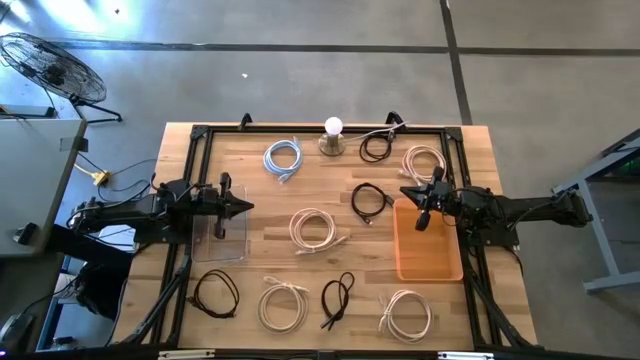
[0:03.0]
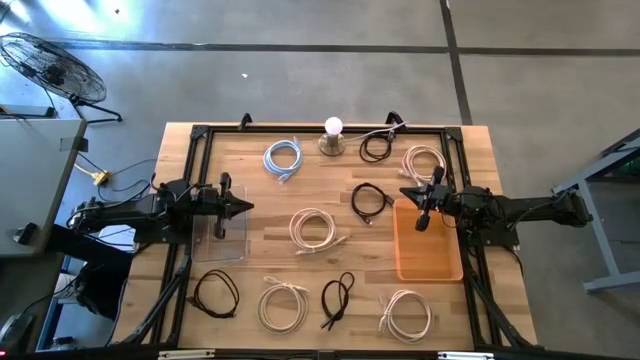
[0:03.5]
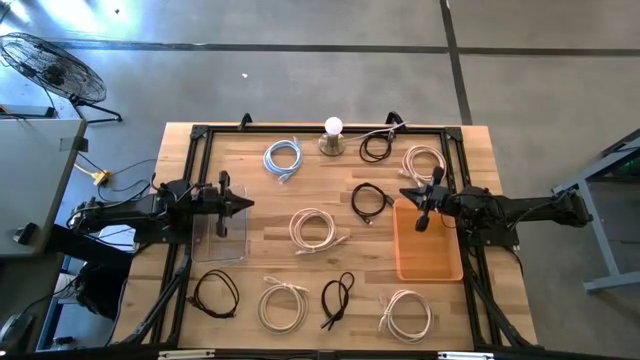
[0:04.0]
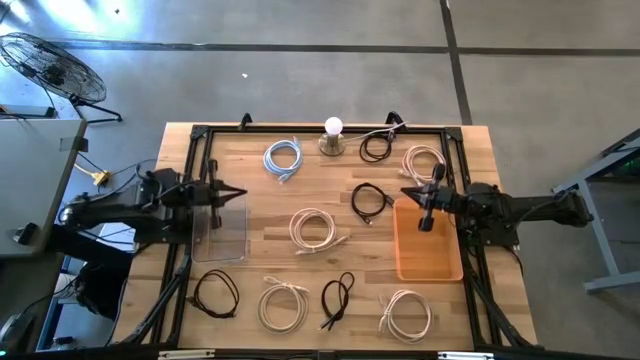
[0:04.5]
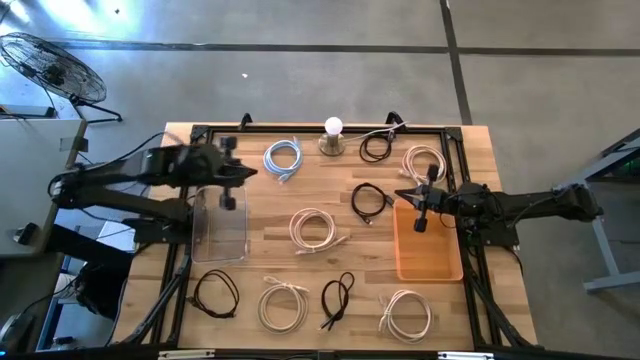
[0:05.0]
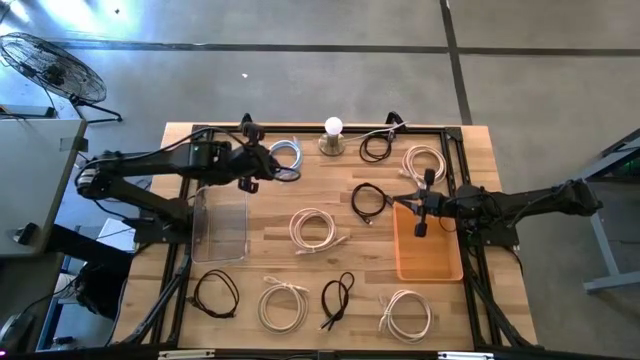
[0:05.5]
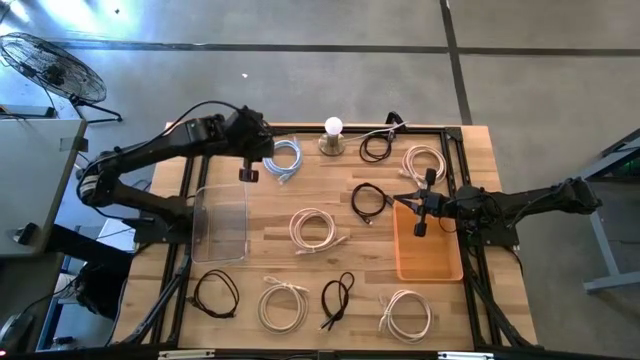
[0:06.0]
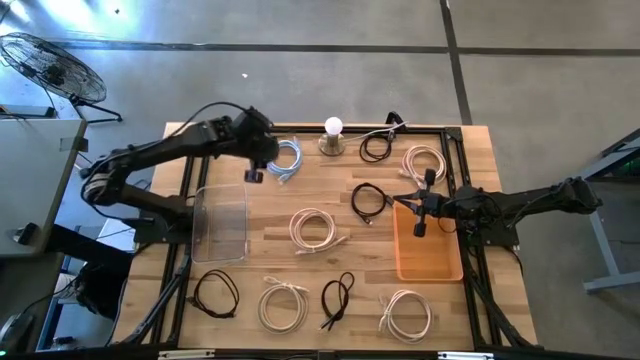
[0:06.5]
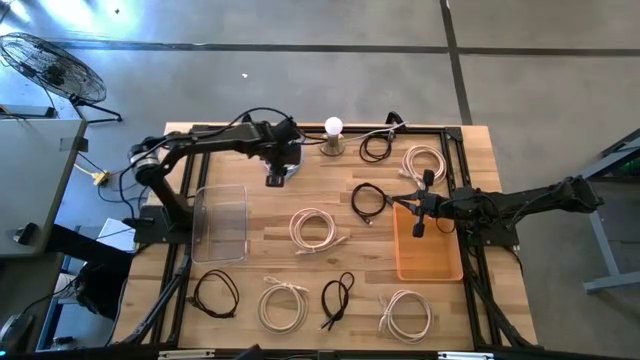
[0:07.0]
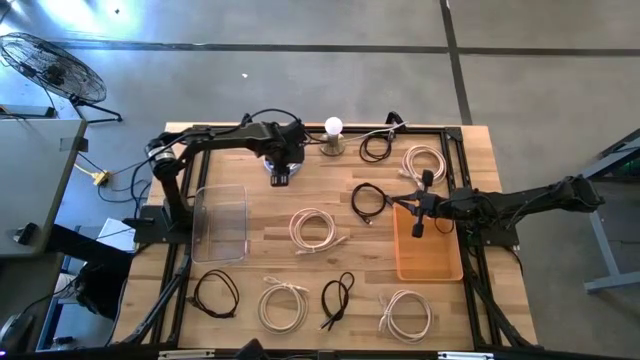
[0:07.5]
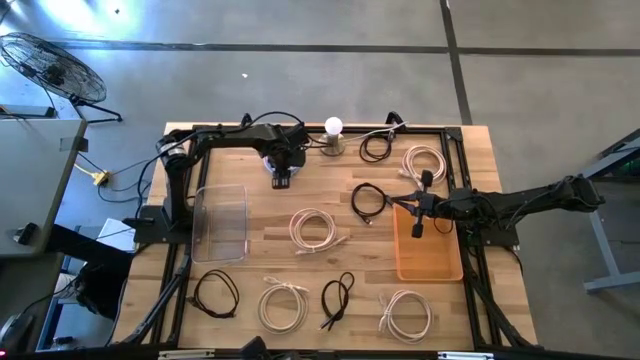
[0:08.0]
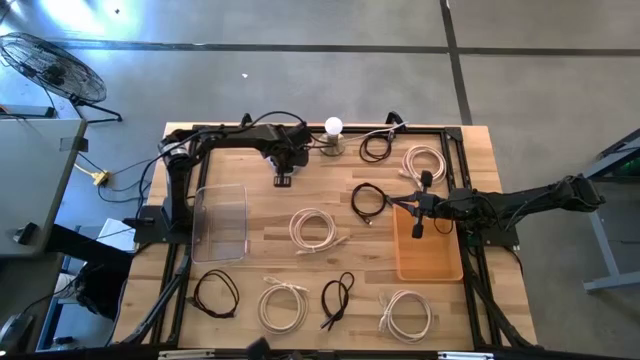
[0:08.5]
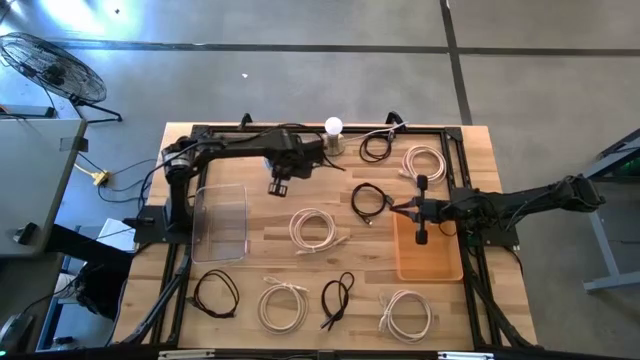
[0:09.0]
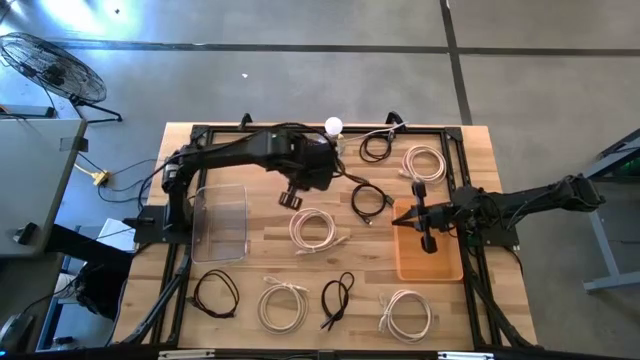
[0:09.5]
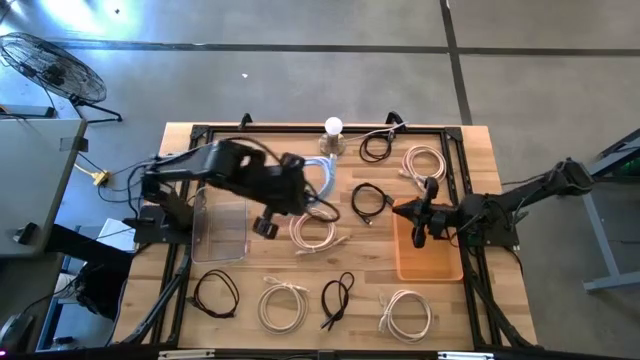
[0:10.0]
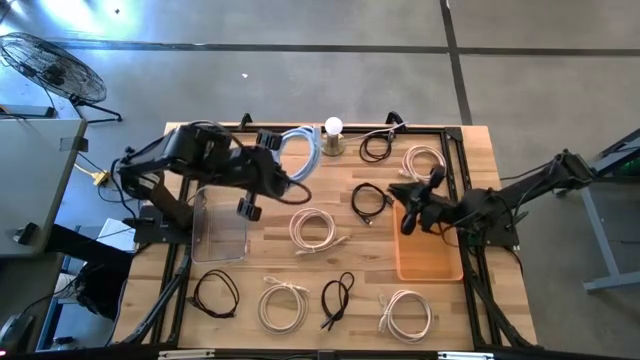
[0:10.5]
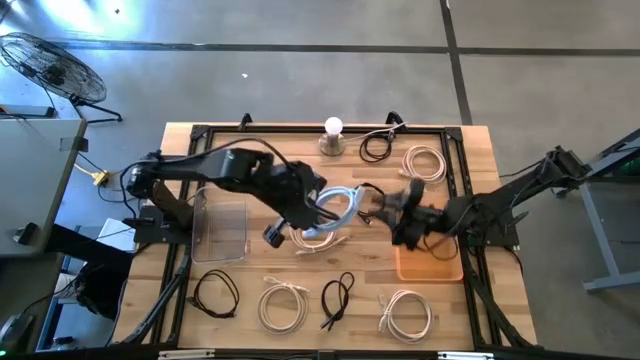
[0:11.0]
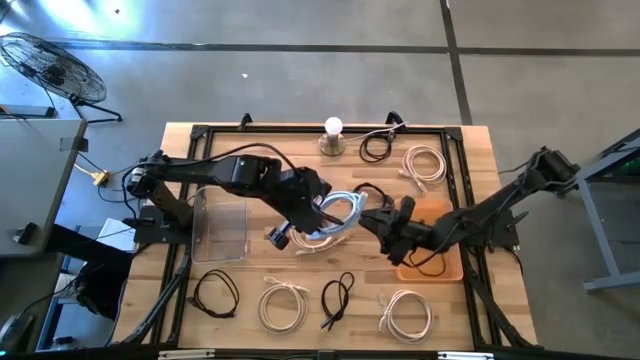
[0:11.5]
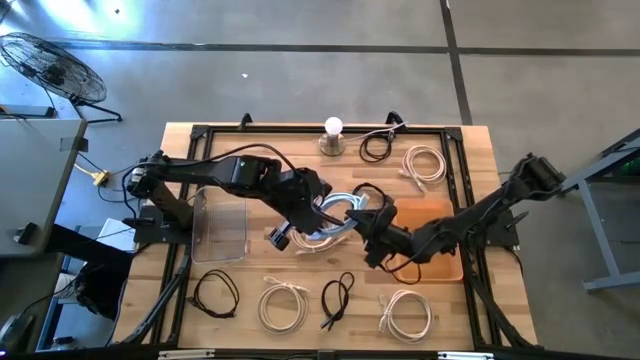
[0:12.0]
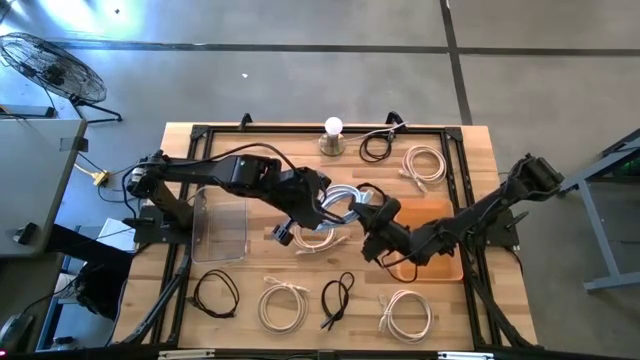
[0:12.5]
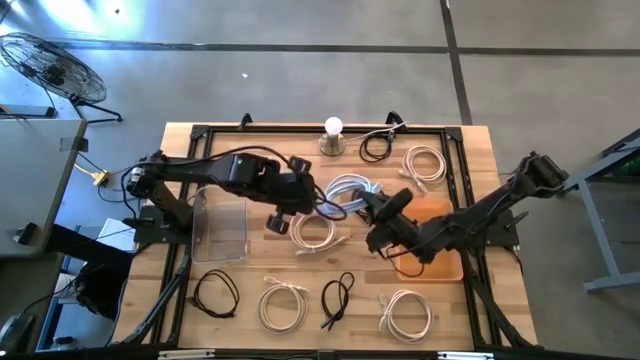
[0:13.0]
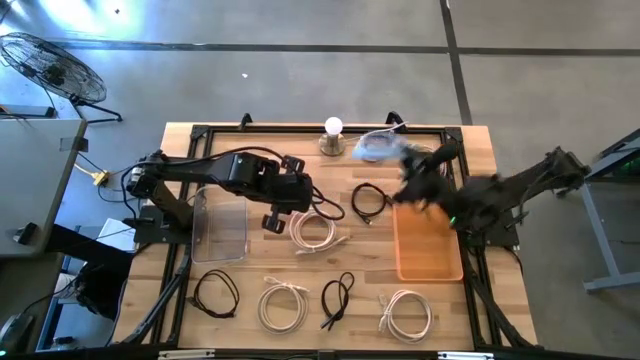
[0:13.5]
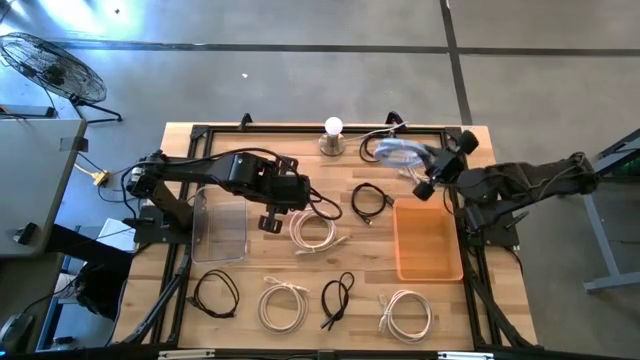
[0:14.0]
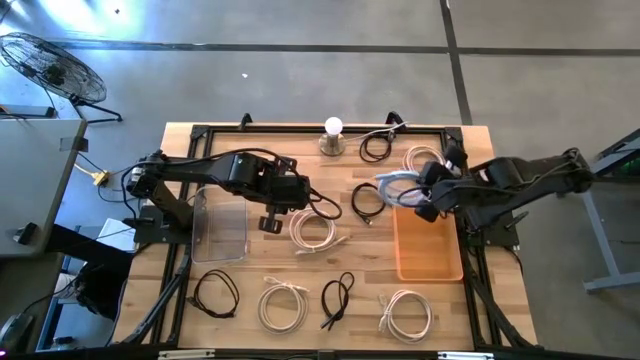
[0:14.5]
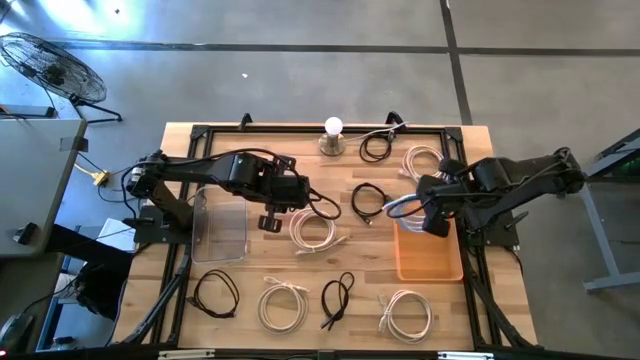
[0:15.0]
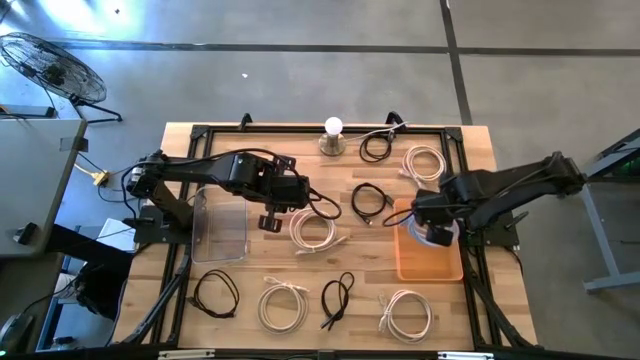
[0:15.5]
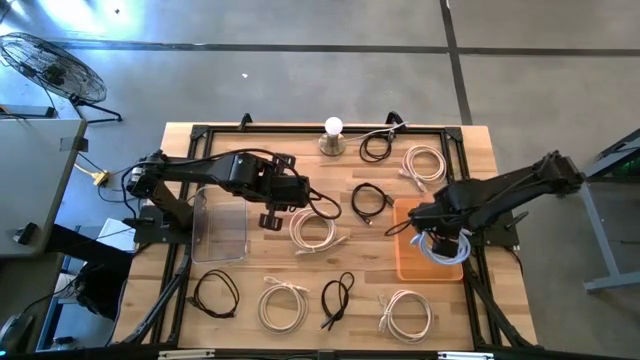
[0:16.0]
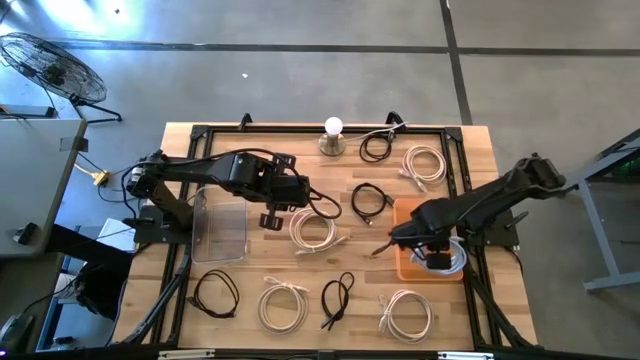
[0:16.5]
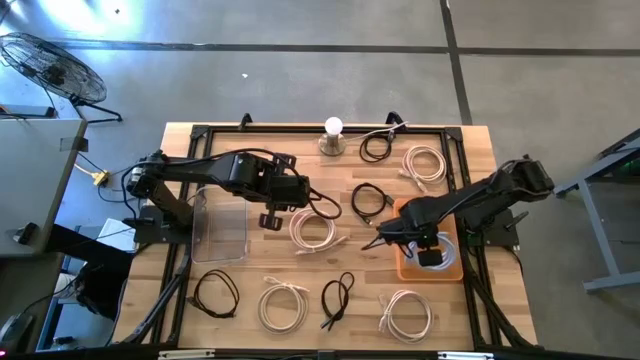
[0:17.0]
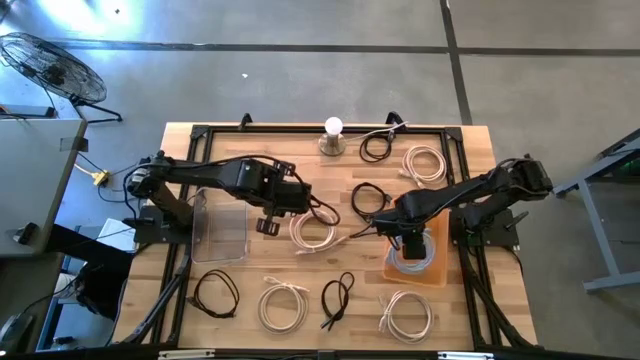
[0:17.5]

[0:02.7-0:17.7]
Task: Pick & Place USB Port
Put the blue HDMI cable into the orange bin

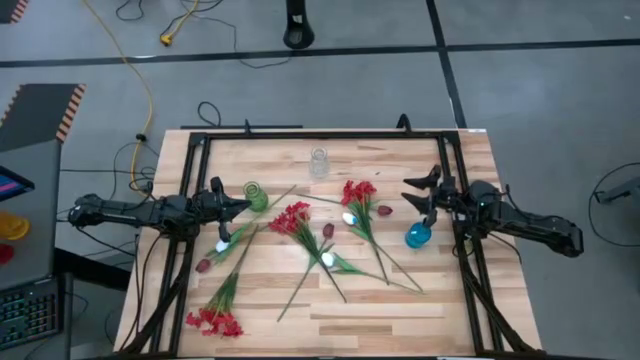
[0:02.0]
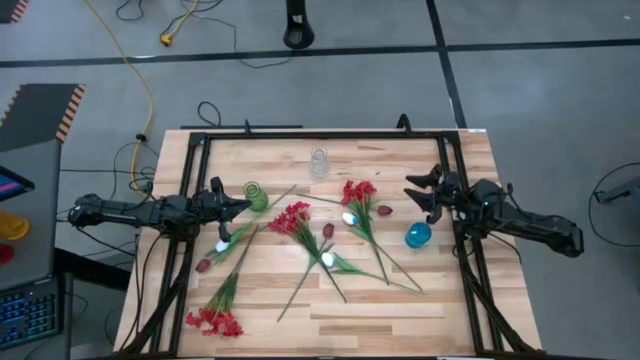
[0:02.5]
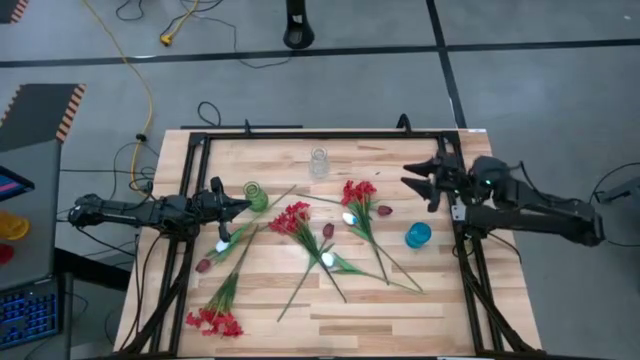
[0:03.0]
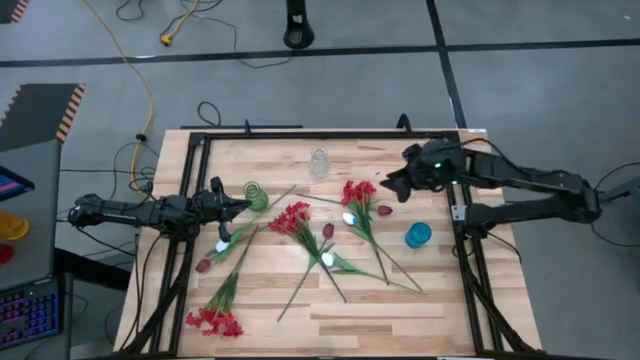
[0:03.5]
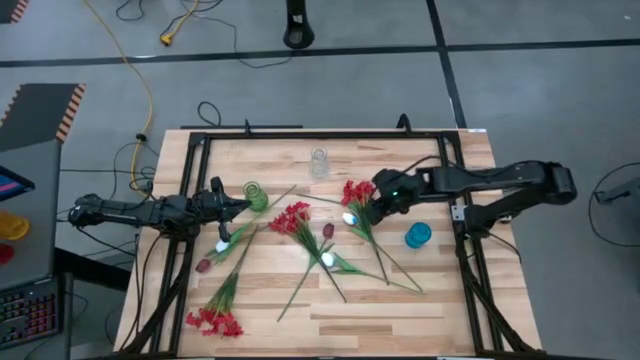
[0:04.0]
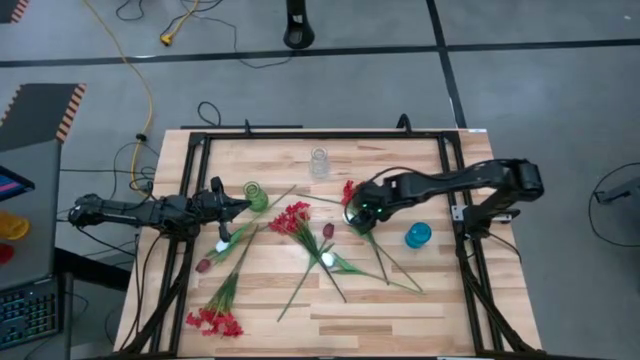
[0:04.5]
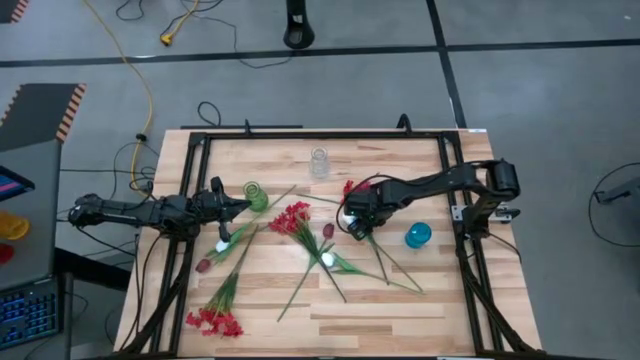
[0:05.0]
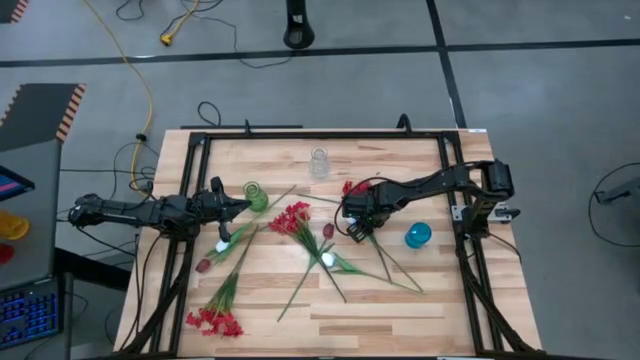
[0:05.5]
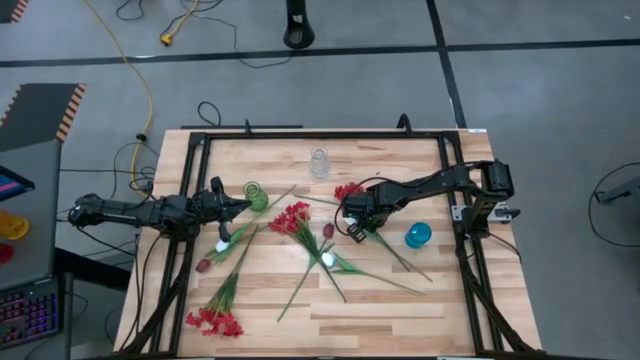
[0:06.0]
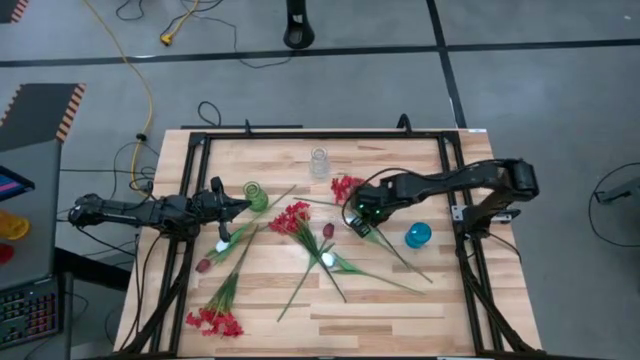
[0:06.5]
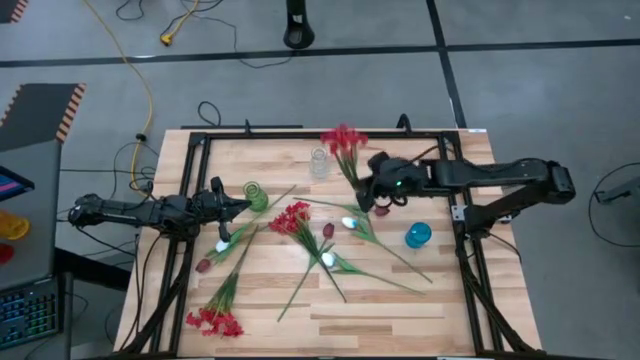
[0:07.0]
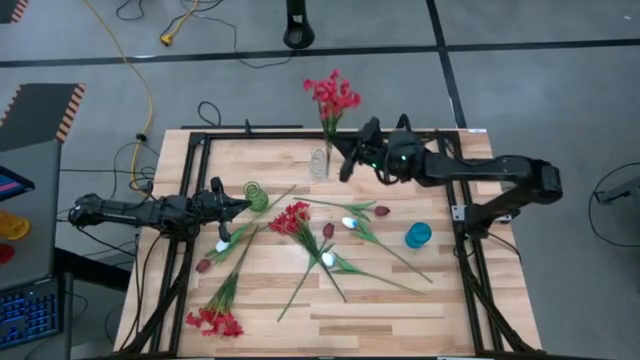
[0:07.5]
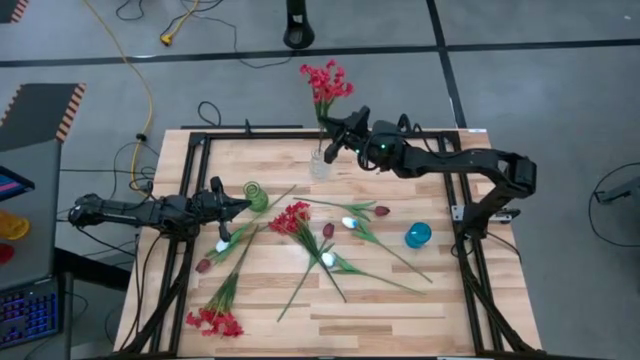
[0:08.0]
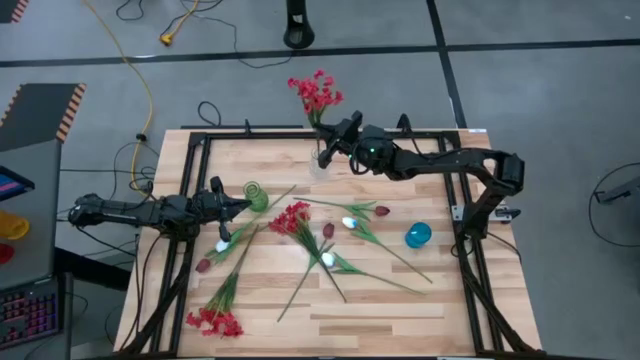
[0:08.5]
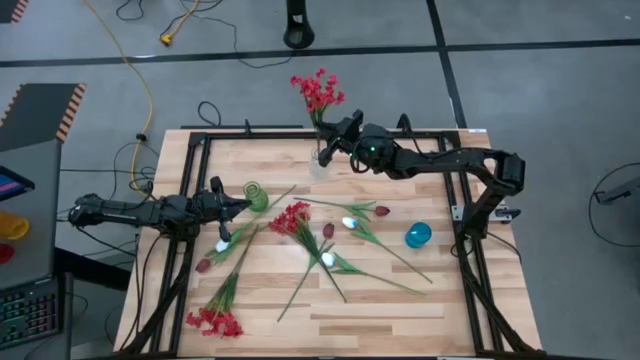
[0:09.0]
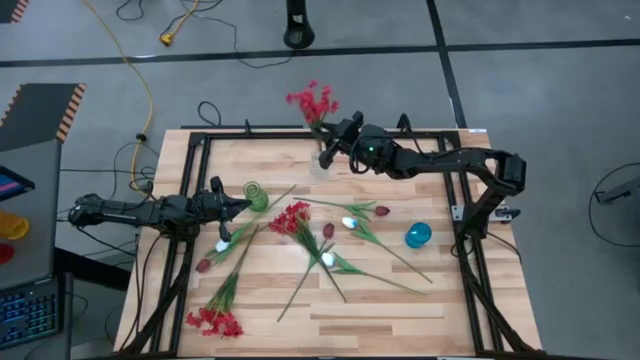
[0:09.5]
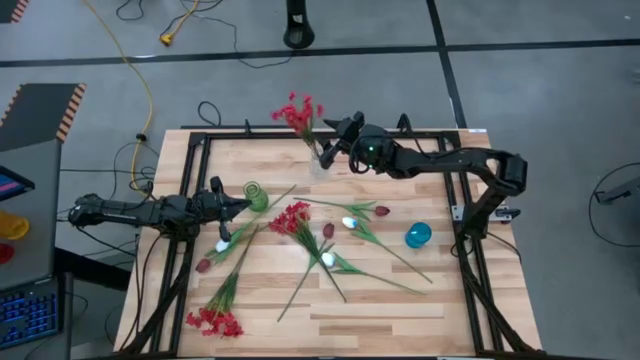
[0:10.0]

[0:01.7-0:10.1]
Task: Sort flowers into vase by color
Put the top right red flowers into the transparent vase
